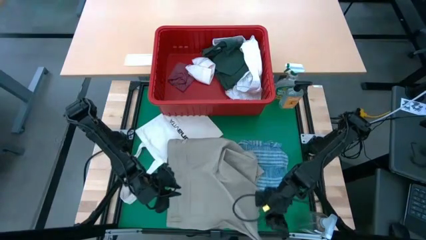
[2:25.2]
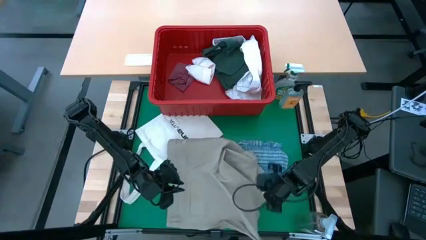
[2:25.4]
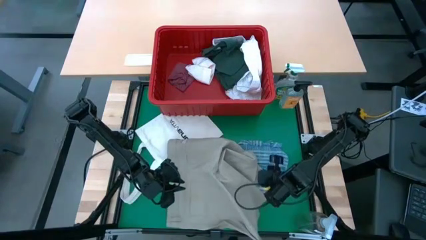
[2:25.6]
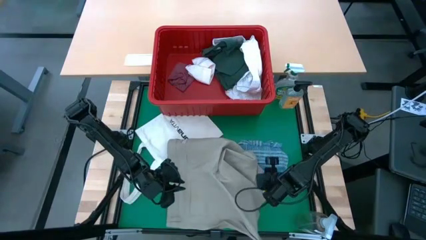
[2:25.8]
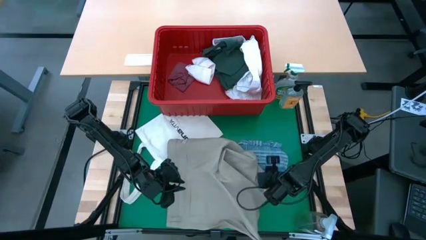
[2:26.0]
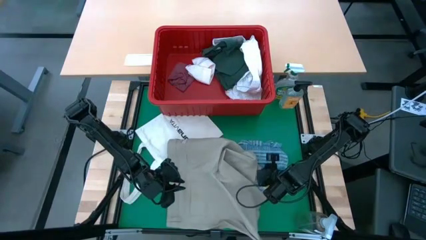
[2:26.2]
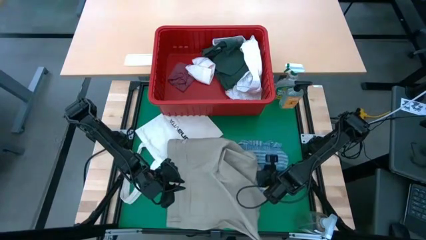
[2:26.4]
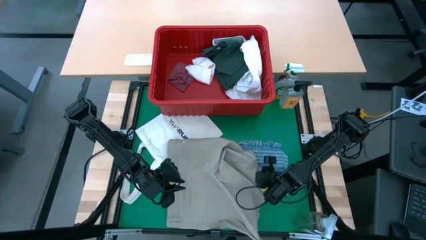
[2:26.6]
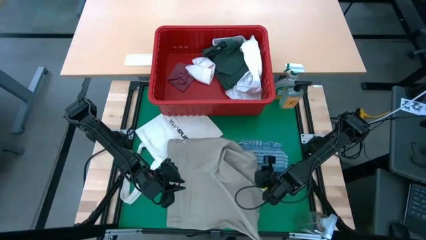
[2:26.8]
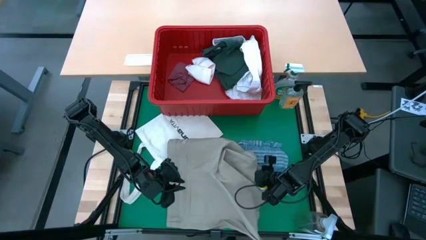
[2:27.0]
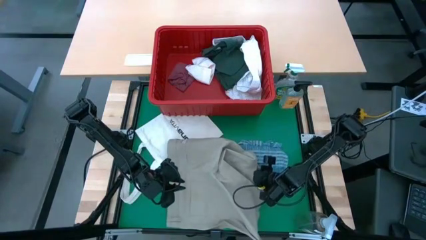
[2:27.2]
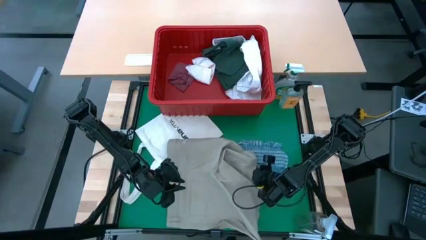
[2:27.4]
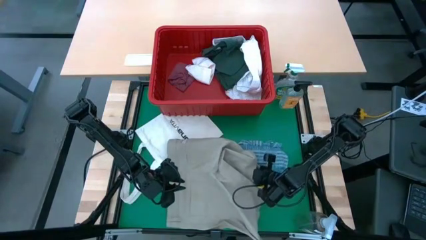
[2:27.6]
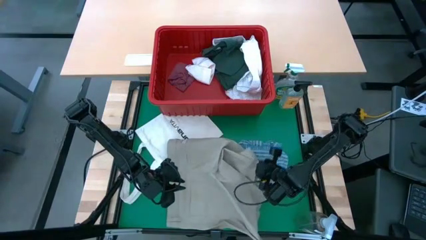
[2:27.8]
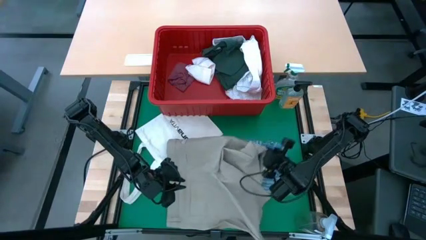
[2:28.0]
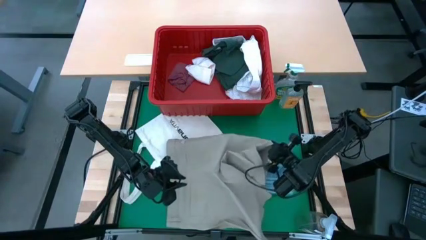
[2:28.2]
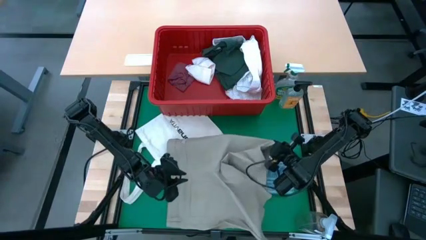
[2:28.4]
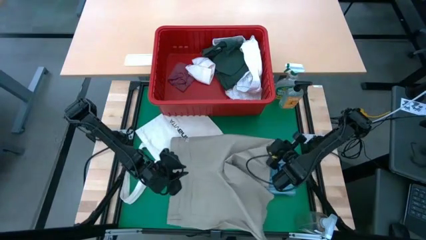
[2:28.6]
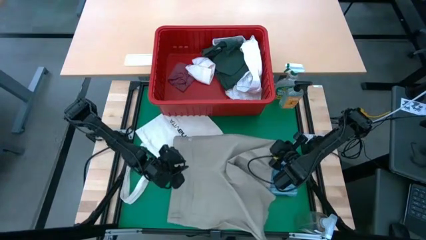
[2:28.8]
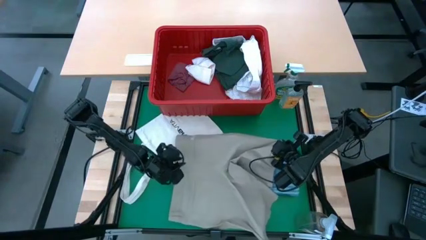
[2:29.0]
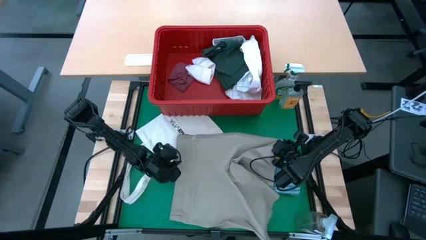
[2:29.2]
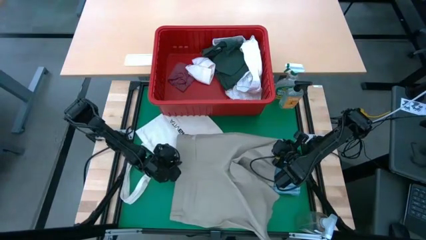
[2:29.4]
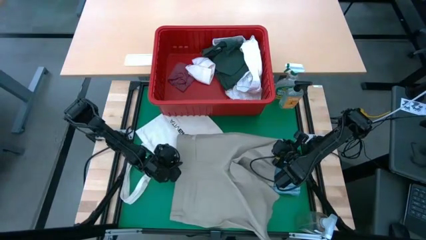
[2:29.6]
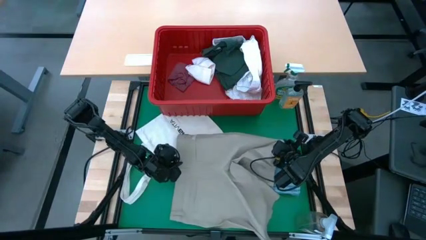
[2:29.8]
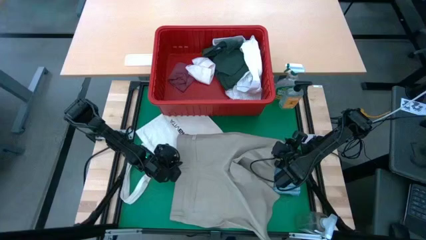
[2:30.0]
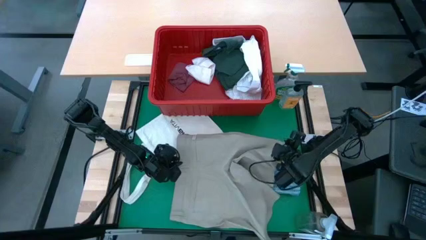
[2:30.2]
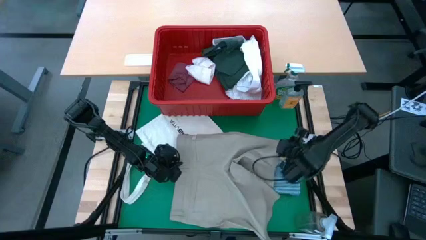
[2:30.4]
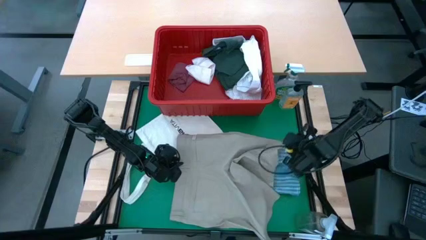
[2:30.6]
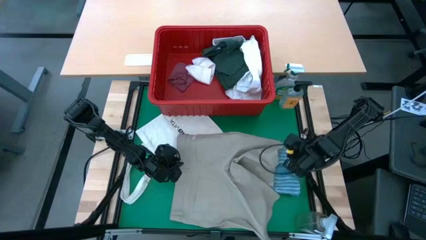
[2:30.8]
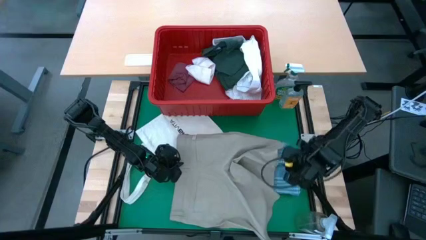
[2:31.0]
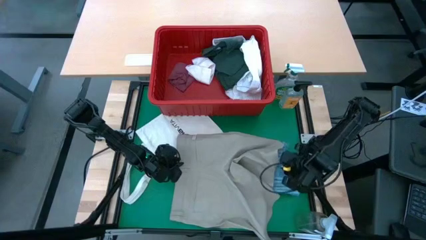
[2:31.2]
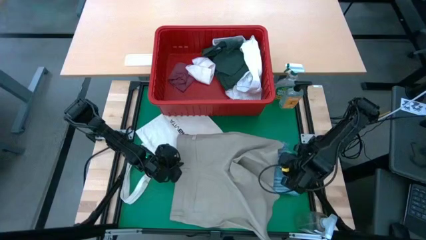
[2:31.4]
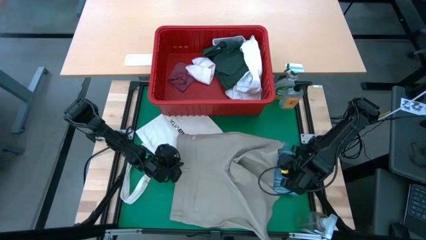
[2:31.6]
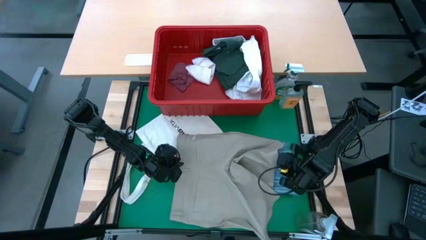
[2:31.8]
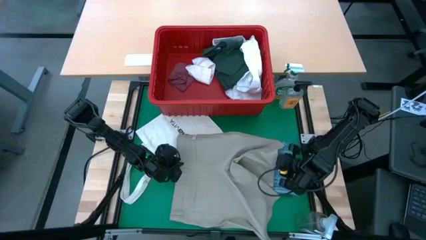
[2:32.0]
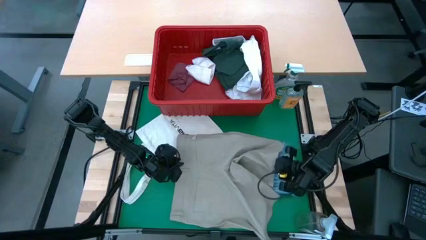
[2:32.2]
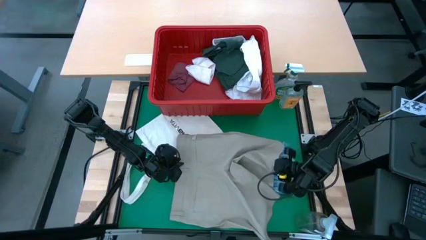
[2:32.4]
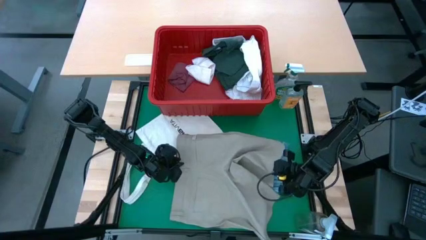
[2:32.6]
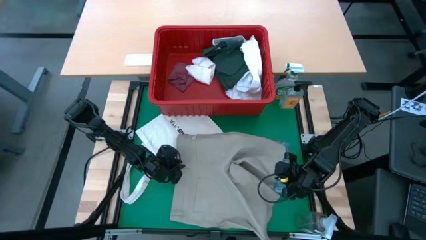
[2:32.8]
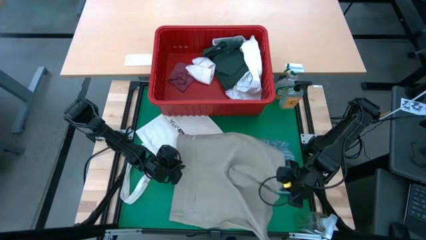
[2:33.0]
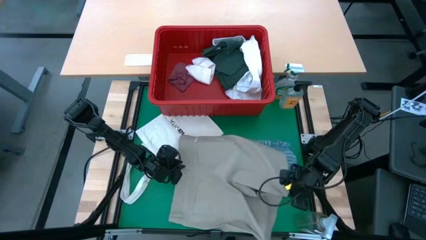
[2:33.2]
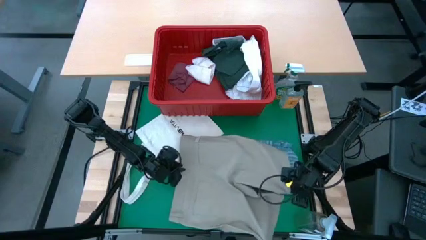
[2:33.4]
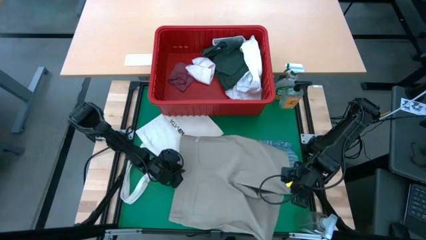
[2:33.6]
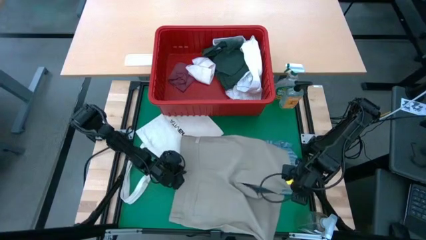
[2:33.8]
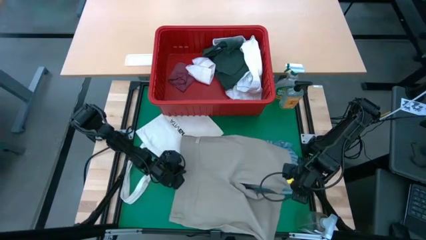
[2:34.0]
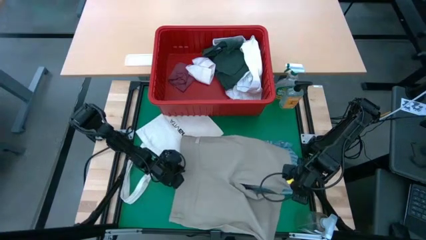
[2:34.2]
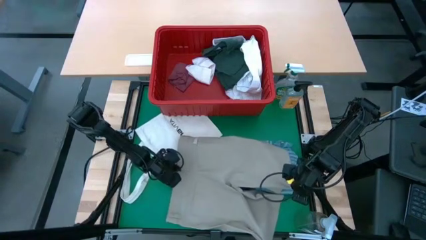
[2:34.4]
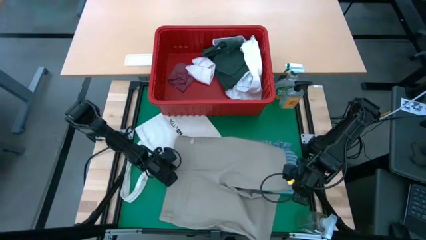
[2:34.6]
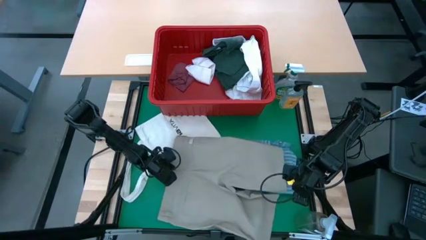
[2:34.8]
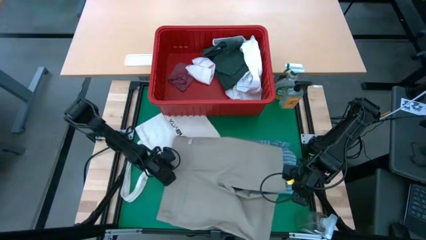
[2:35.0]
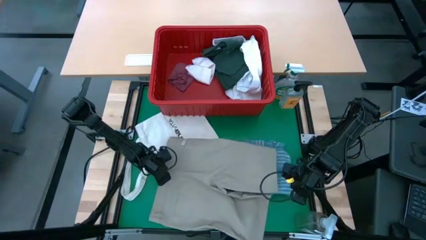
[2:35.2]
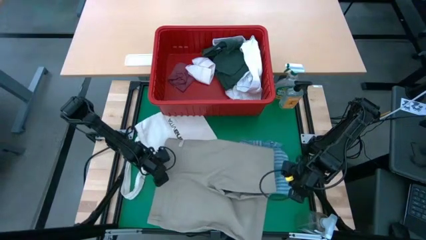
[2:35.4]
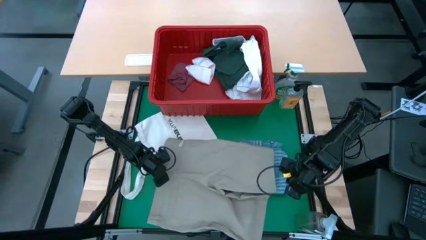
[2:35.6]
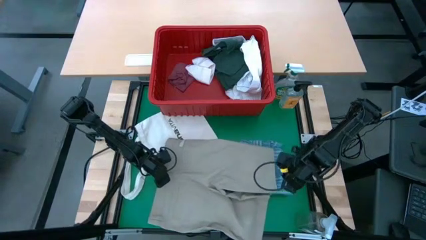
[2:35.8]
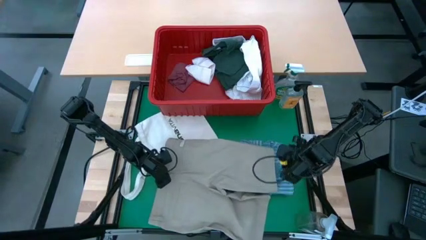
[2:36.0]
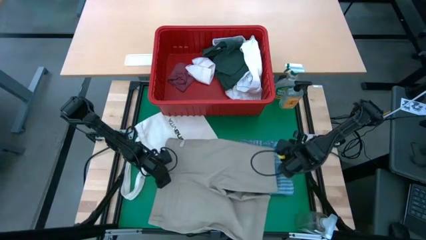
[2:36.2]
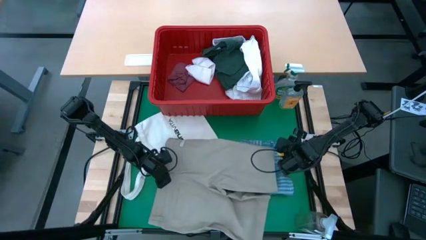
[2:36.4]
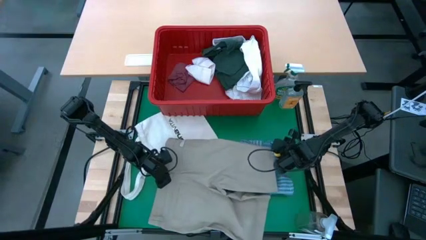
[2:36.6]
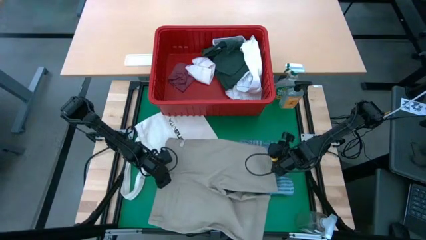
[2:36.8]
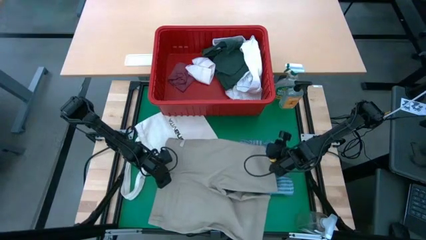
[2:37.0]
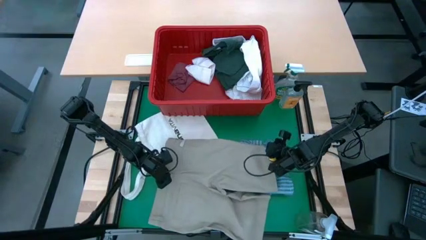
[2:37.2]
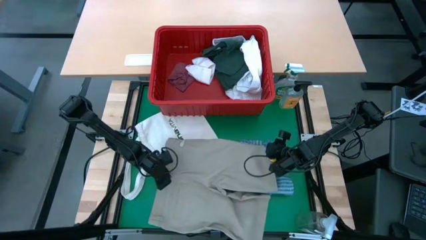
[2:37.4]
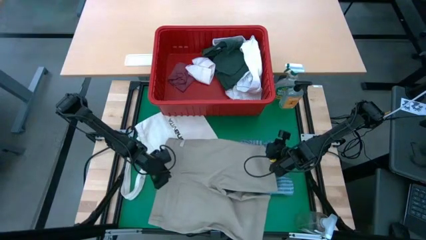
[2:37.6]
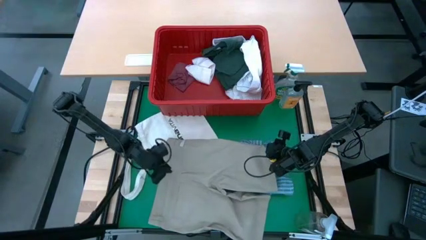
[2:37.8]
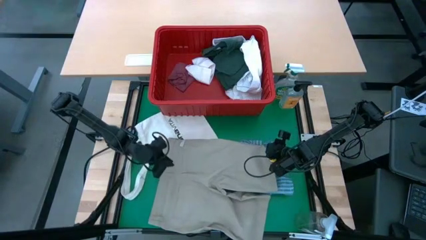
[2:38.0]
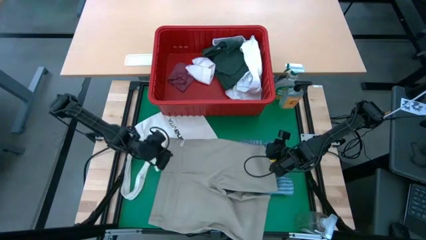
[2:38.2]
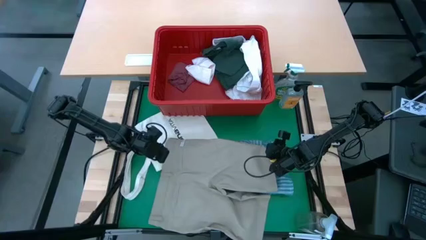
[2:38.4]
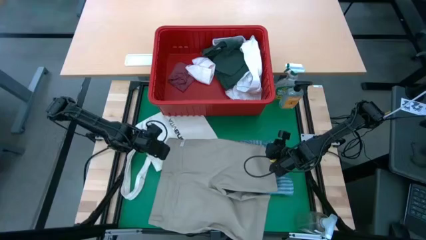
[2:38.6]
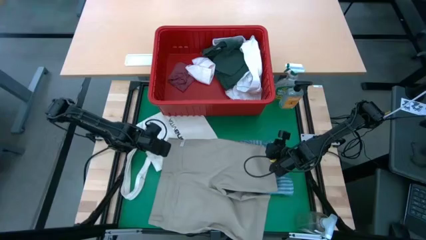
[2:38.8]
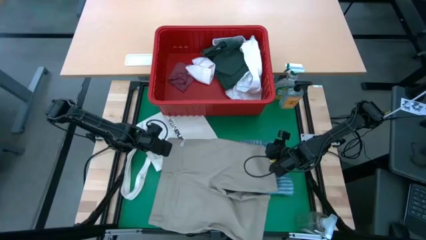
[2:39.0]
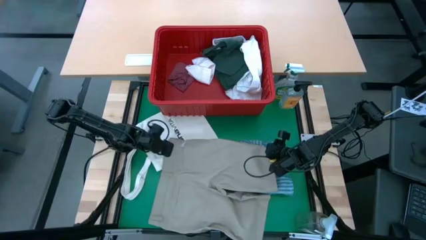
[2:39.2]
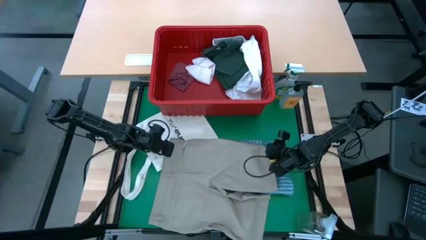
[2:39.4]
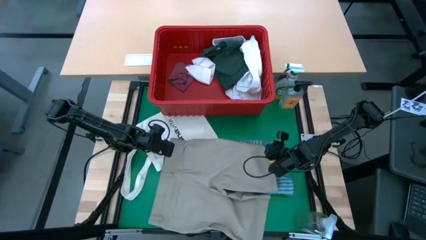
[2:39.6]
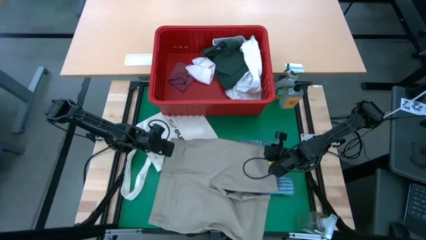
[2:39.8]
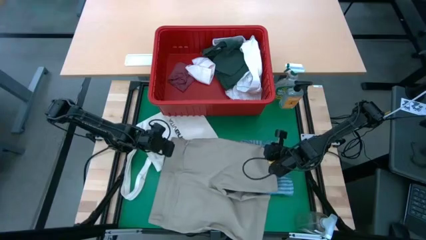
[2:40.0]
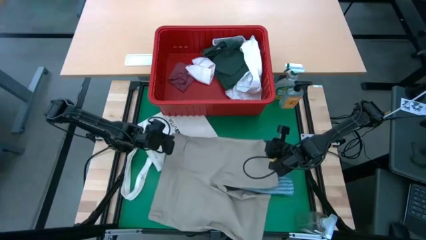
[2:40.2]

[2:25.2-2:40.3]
Task: Fold Laundry from Bin
Fold the brown shorts
